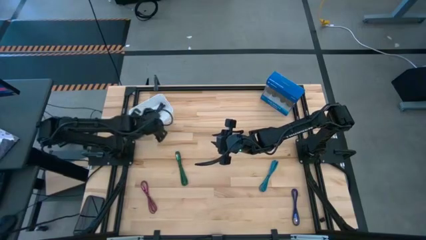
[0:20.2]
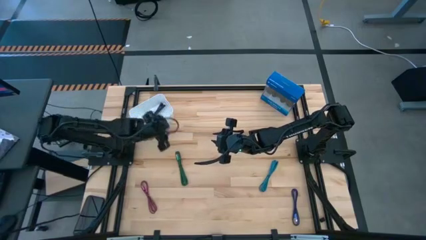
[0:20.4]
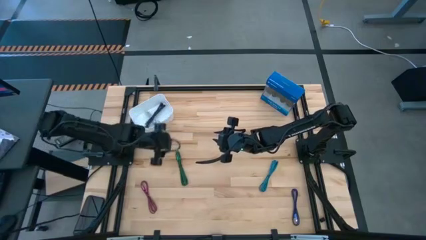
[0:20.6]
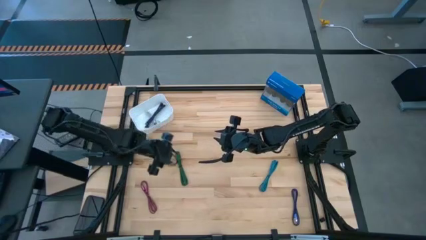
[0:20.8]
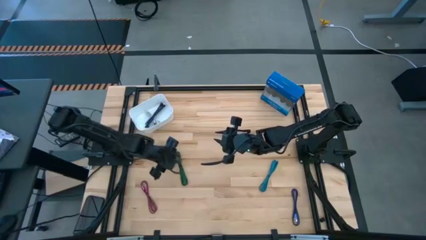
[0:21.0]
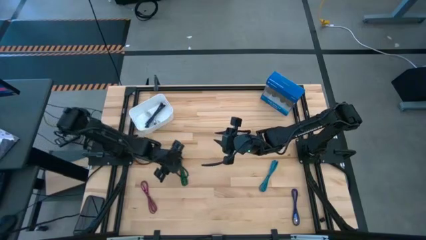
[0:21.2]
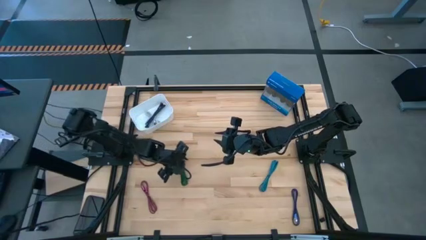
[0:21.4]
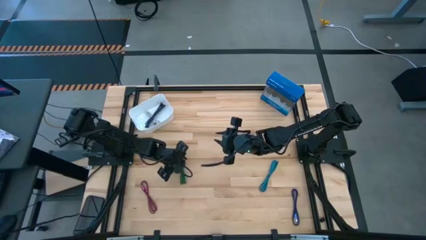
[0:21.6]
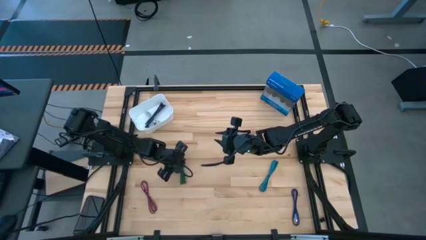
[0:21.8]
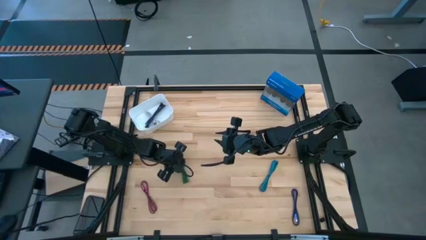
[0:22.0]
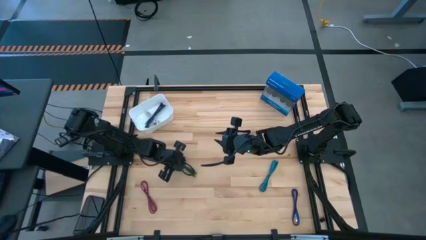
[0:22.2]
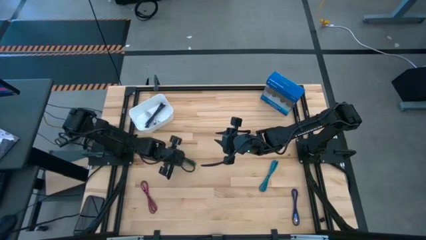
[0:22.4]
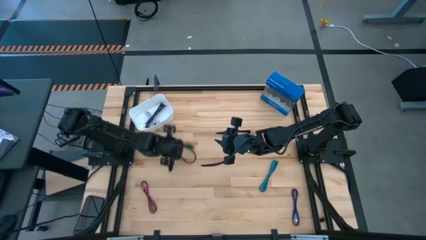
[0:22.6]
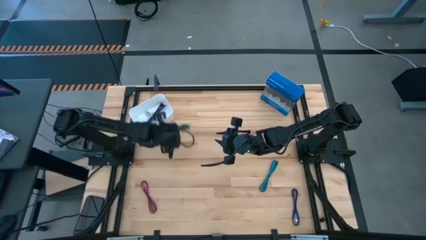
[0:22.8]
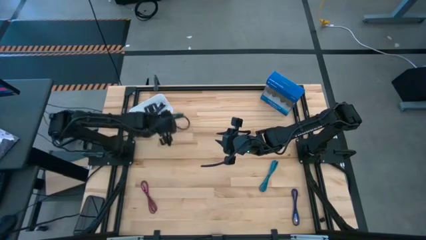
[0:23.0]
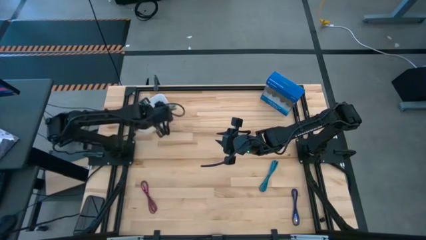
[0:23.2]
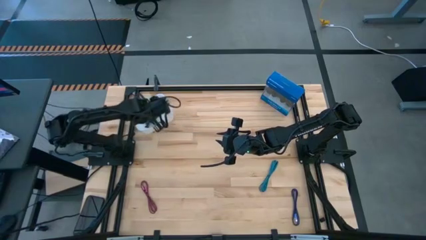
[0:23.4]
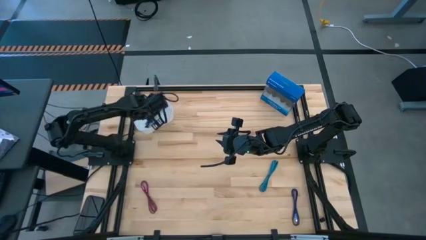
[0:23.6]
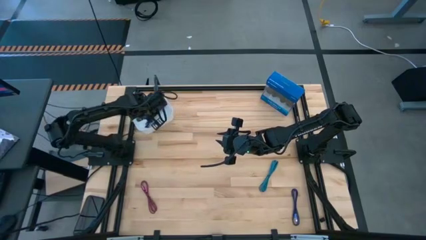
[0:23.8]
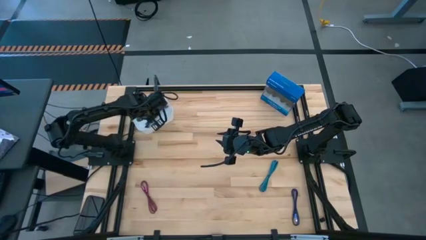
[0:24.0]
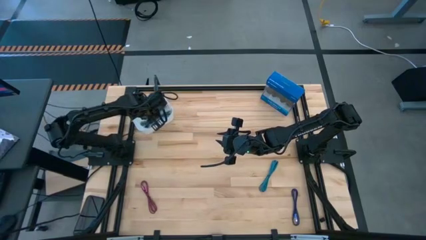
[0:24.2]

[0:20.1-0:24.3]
Task: Pick and place USB-C Cables
Put the green charger cable into the white bin

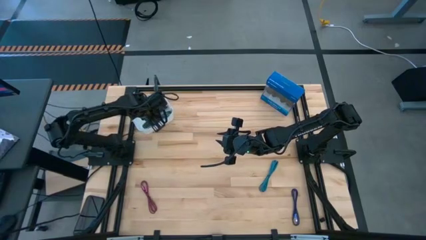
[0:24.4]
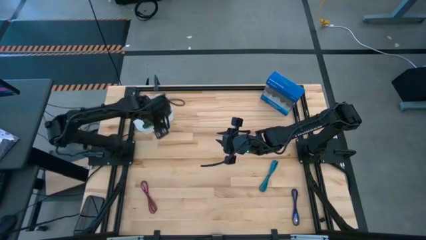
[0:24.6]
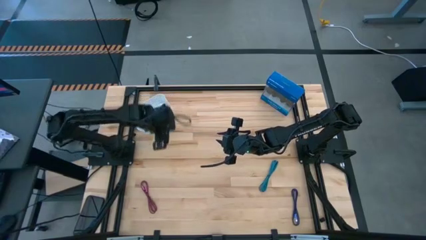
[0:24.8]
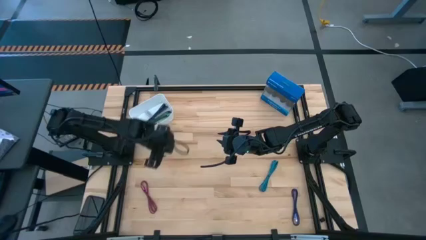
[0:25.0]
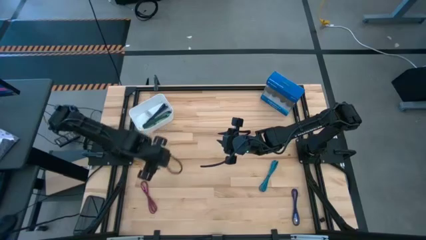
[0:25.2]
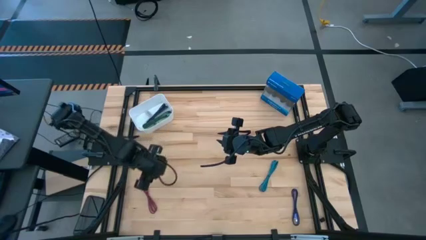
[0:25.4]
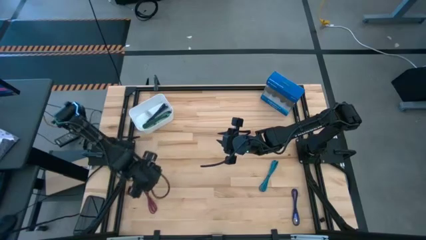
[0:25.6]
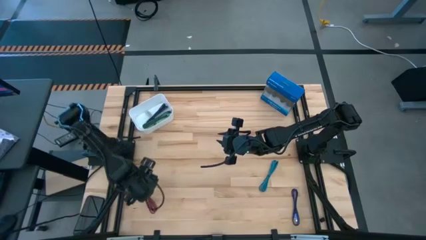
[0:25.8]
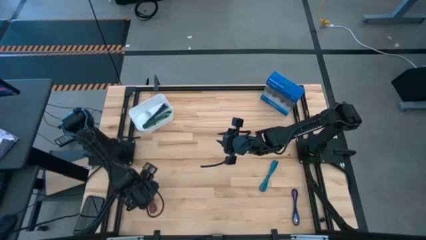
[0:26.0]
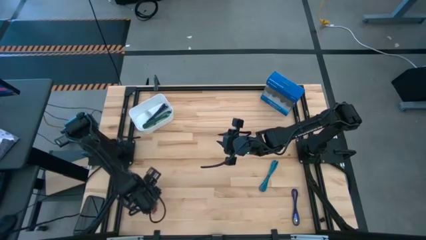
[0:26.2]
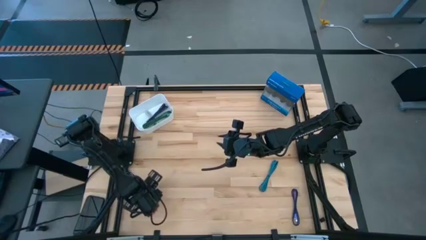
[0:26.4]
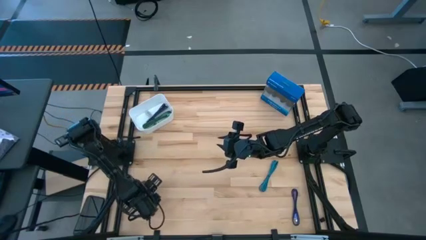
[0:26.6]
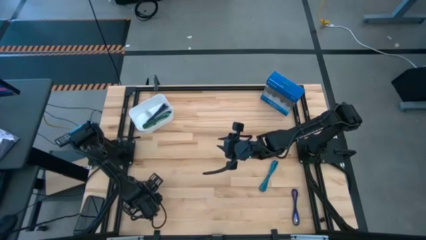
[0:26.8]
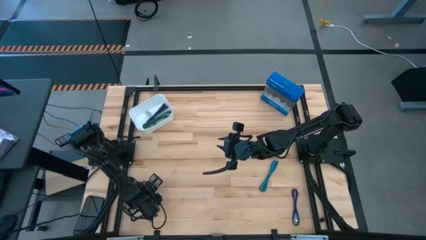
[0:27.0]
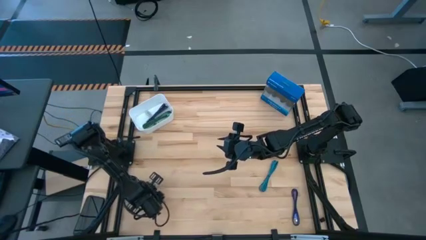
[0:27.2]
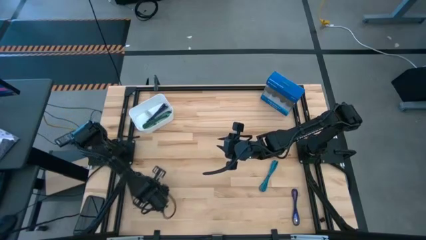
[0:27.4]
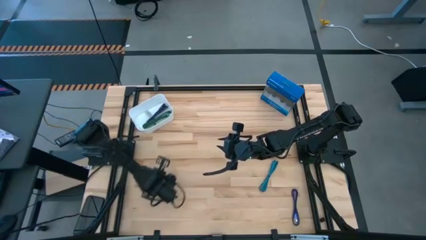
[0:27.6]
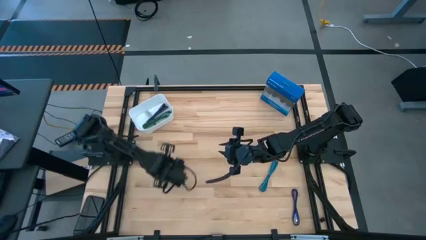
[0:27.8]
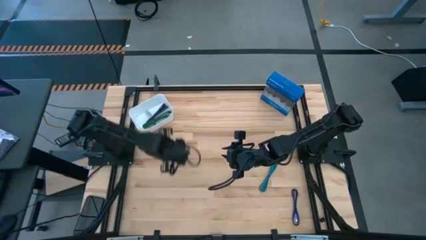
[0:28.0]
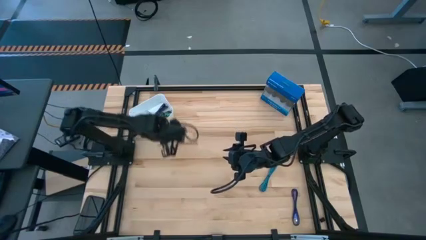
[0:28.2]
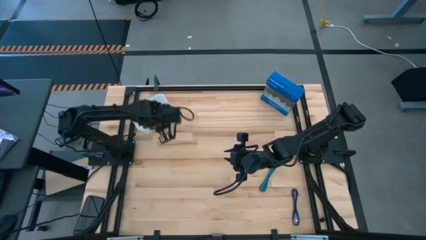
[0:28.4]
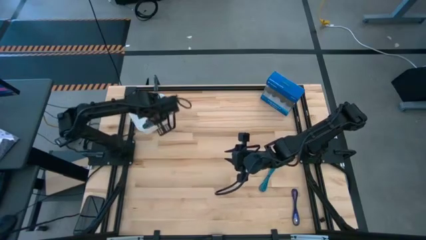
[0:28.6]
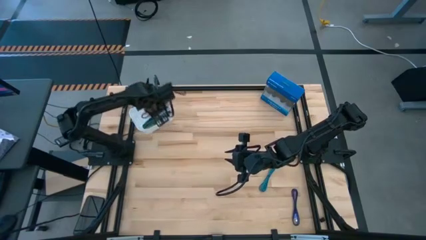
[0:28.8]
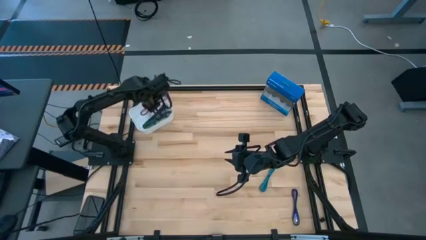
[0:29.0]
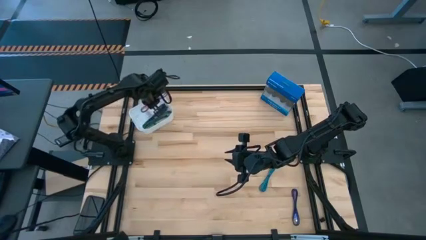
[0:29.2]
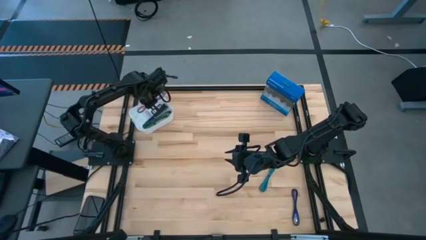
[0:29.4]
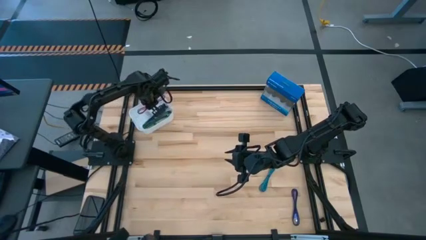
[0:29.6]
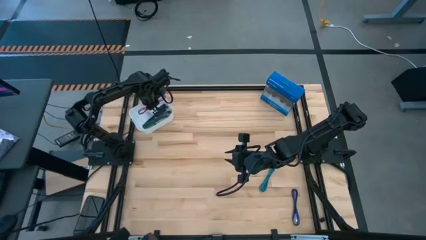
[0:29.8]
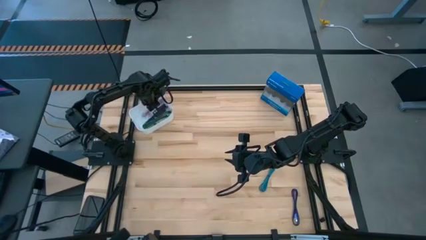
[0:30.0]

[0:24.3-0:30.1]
Put the pink charger cable into the white bin

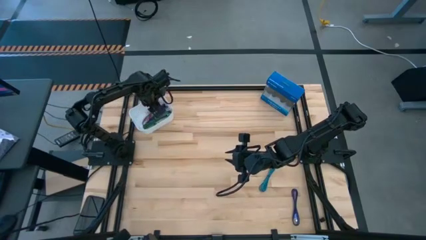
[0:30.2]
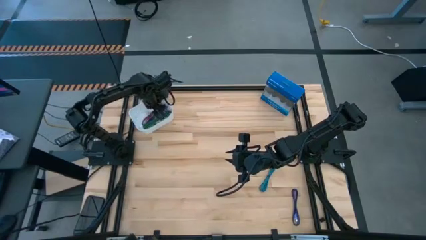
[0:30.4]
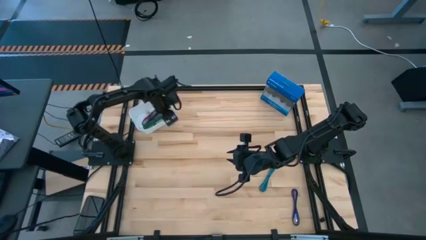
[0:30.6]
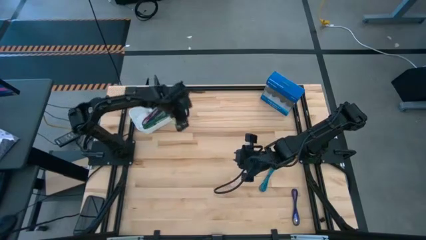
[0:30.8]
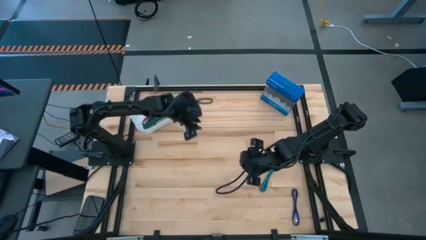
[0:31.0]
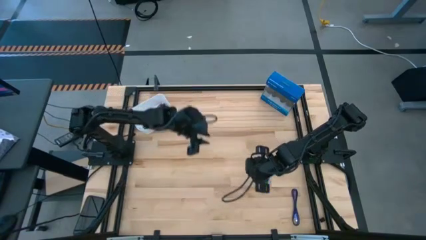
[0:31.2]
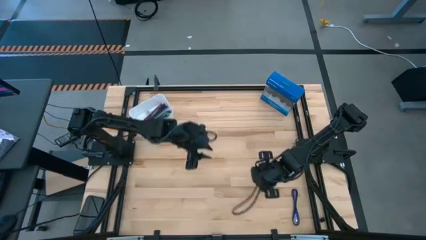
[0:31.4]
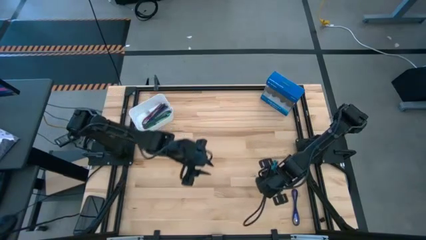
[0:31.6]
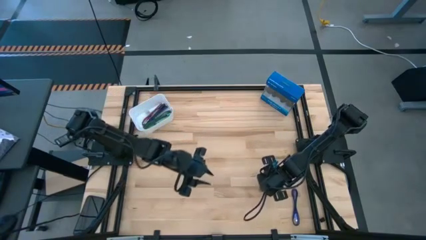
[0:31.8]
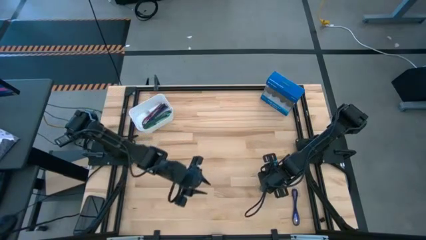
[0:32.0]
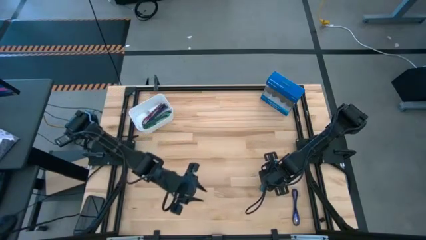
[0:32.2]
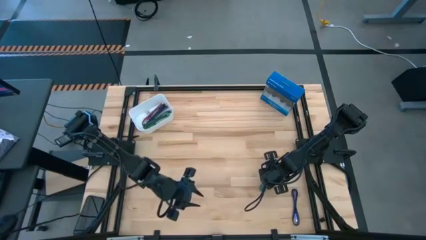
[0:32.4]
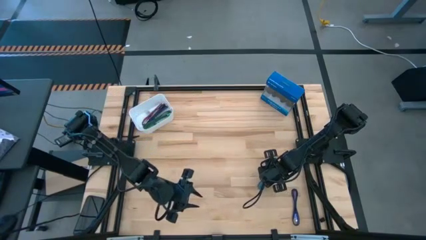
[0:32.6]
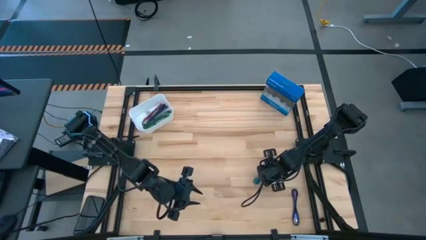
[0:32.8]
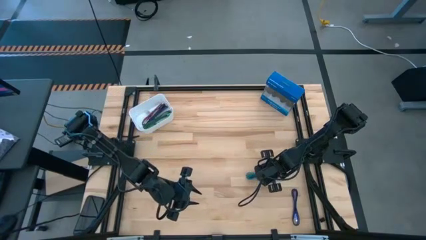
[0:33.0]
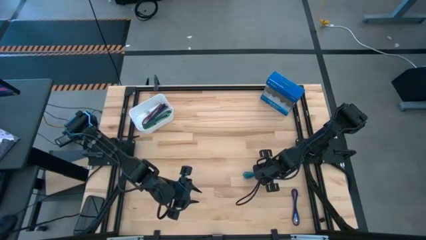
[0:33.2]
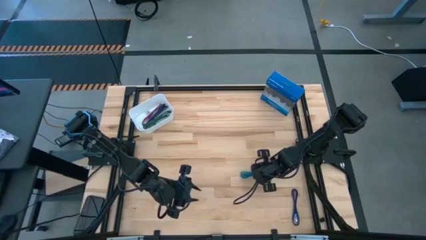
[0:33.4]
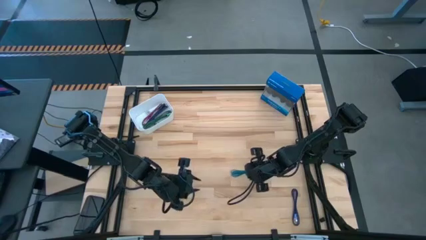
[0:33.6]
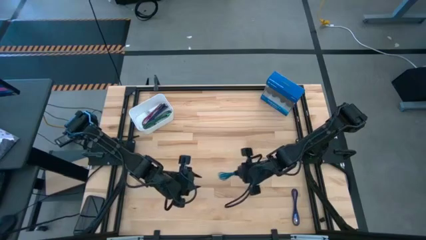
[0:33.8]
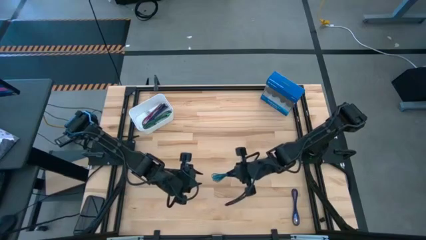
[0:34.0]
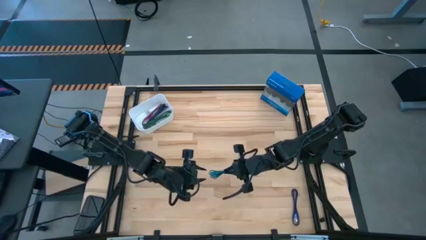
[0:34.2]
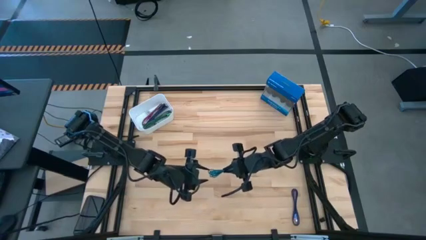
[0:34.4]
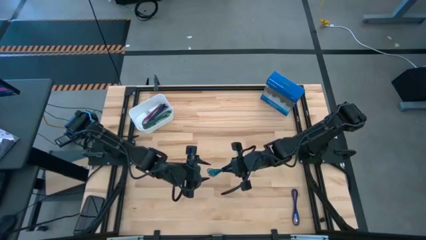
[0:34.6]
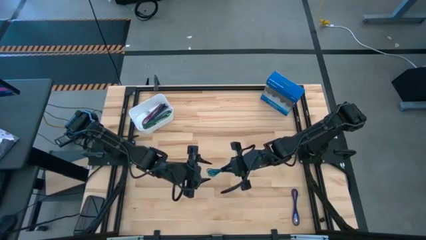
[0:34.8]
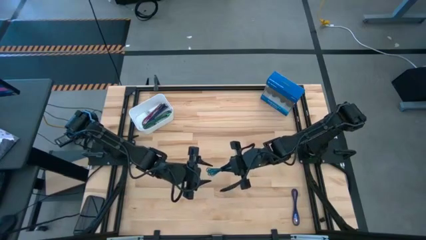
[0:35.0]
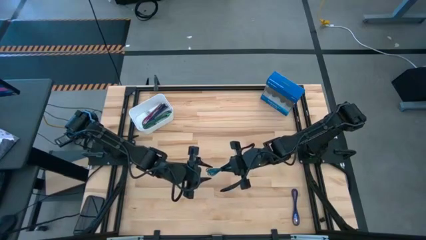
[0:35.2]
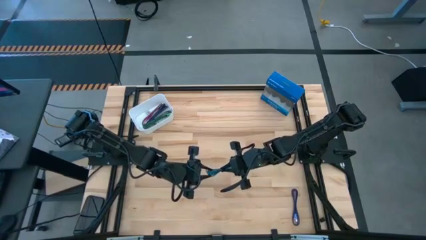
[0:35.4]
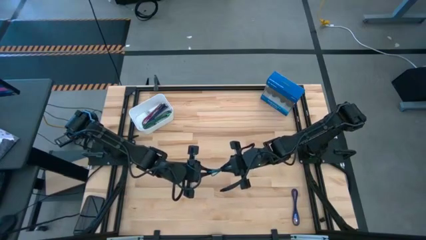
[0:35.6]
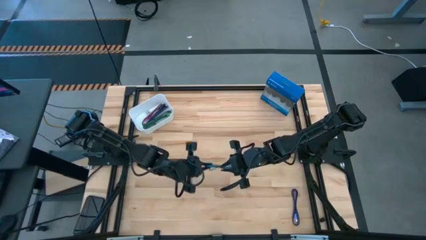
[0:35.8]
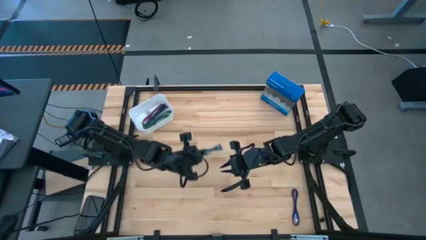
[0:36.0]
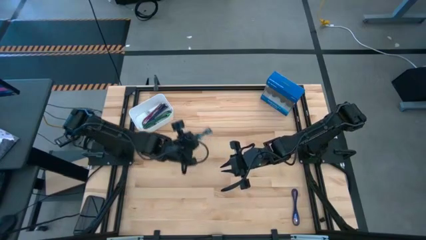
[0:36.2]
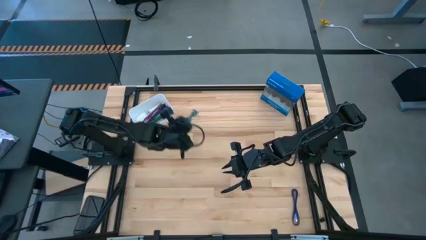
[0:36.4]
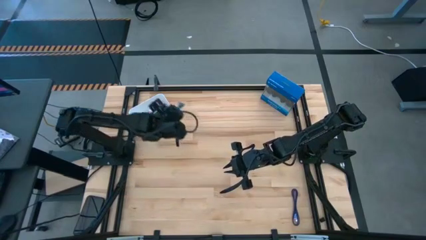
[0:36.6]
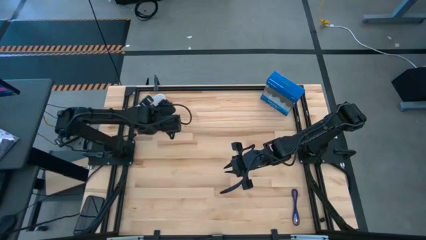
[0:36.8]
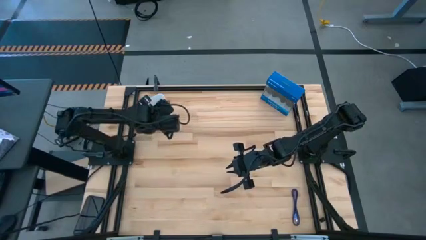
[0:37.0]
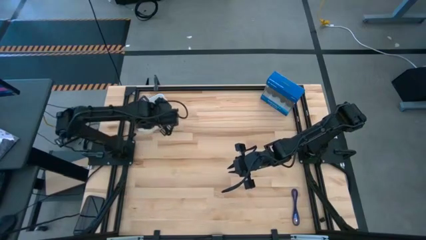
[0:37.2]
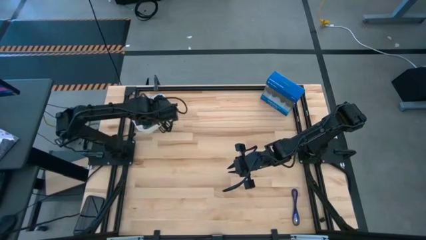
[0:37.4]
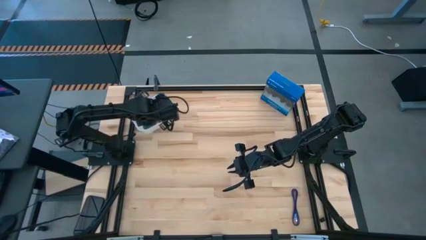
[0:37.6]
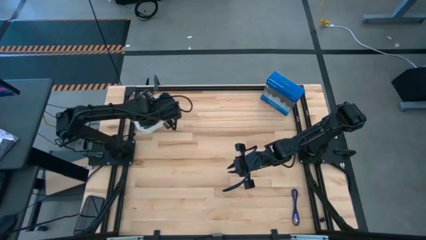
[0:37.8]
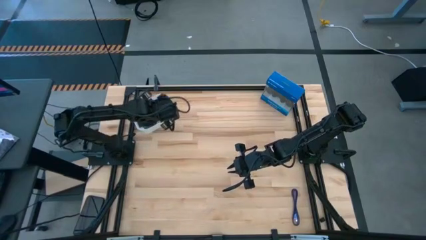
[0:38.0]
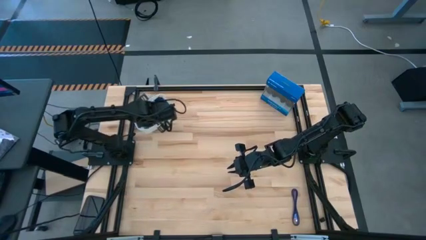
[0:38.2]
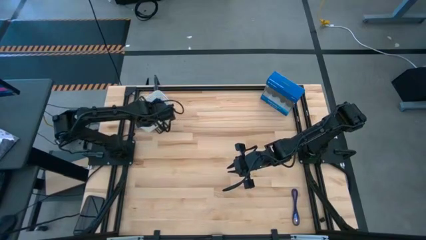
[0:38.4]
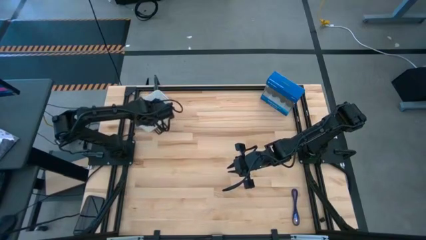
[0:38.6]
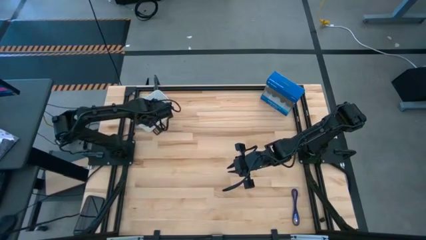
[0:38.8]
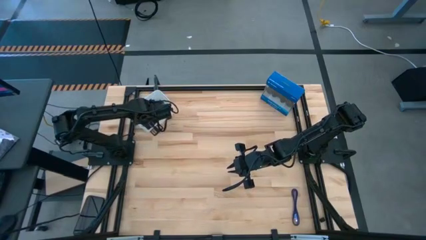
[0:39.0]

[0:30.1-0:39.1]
Put the blue charger cable into the white bin
